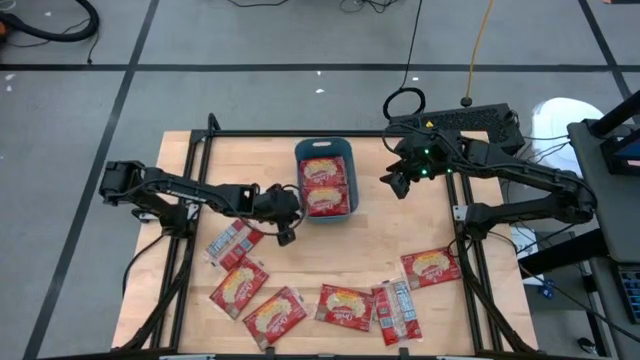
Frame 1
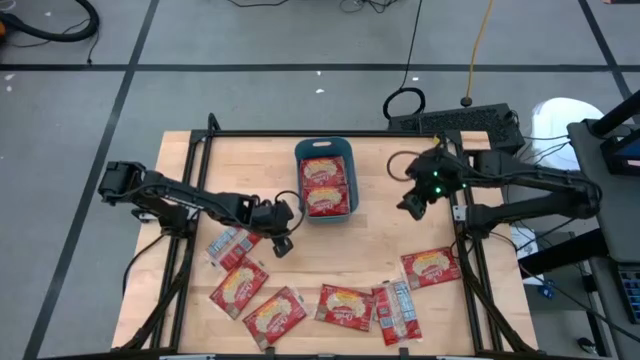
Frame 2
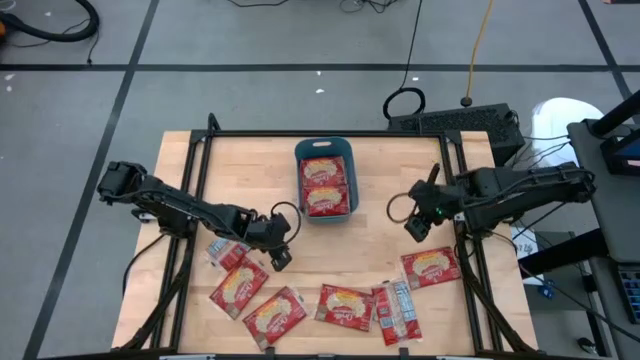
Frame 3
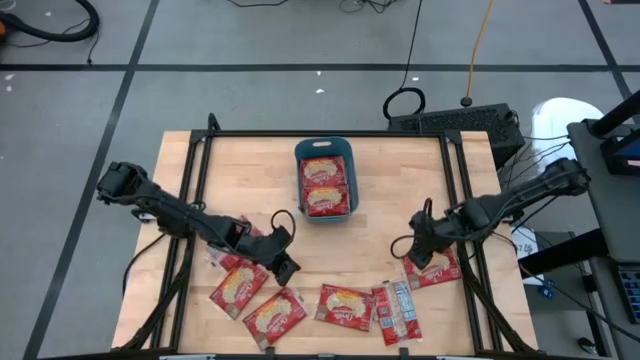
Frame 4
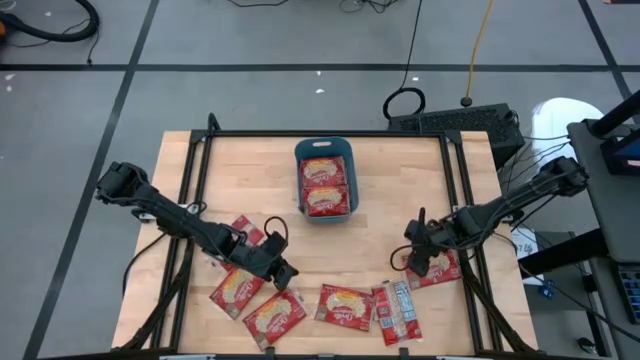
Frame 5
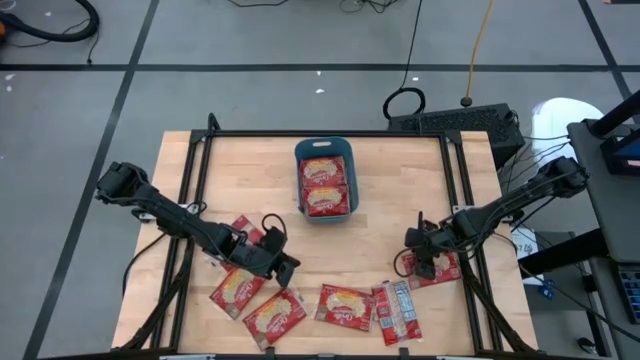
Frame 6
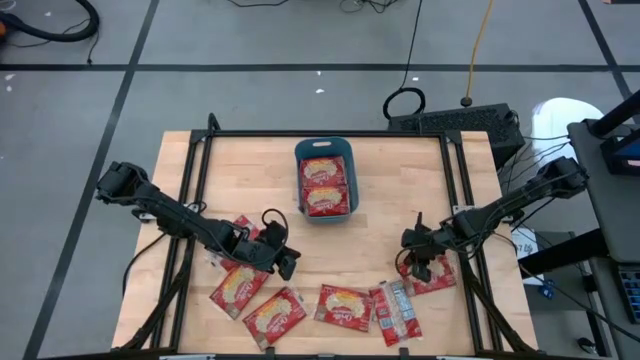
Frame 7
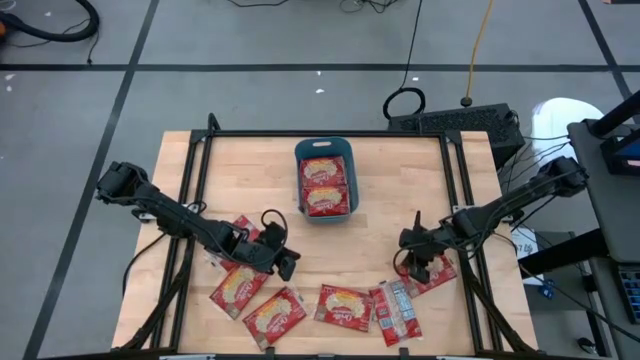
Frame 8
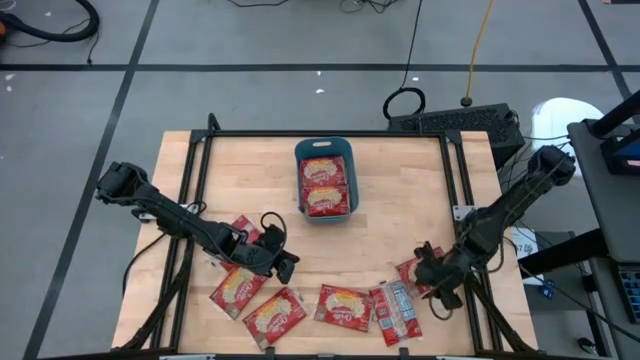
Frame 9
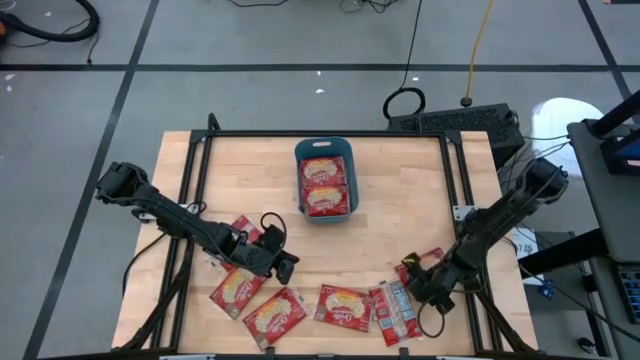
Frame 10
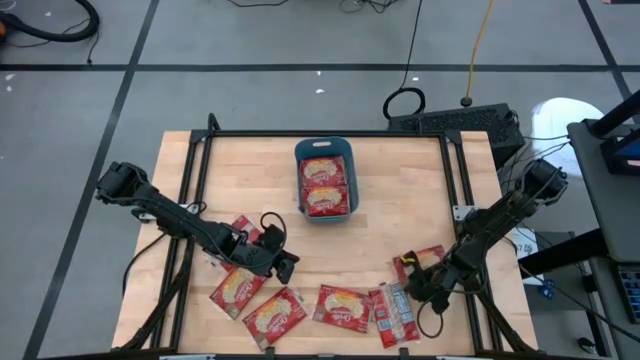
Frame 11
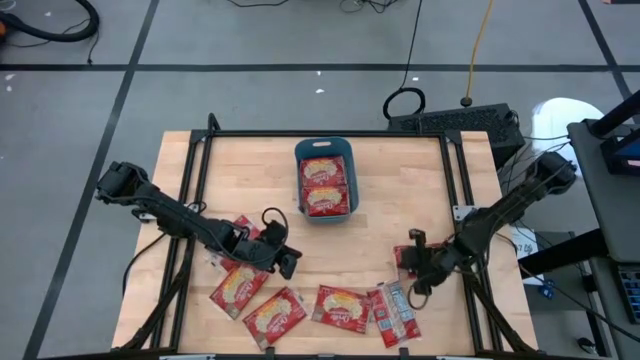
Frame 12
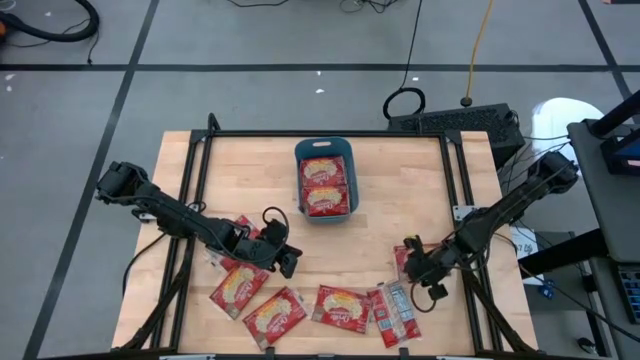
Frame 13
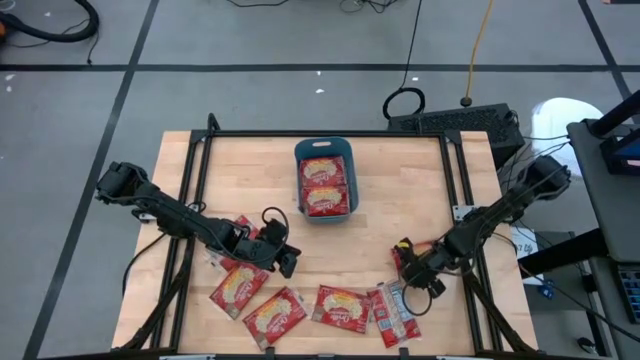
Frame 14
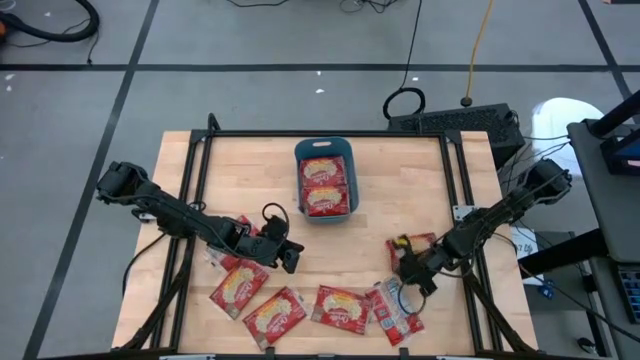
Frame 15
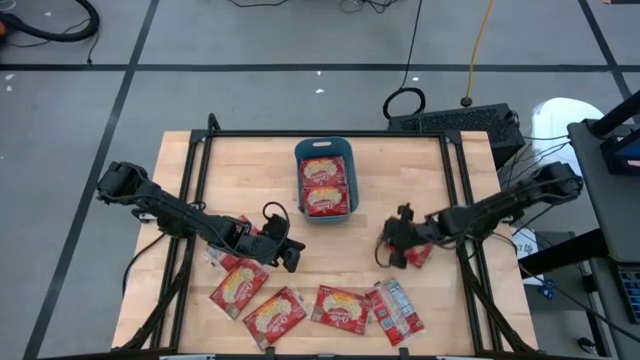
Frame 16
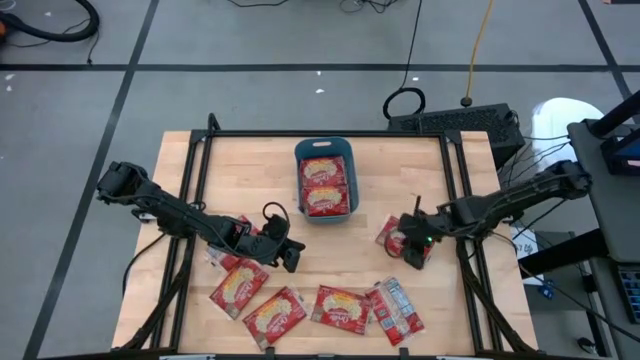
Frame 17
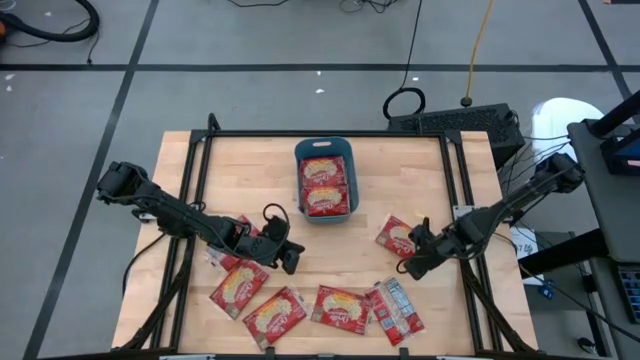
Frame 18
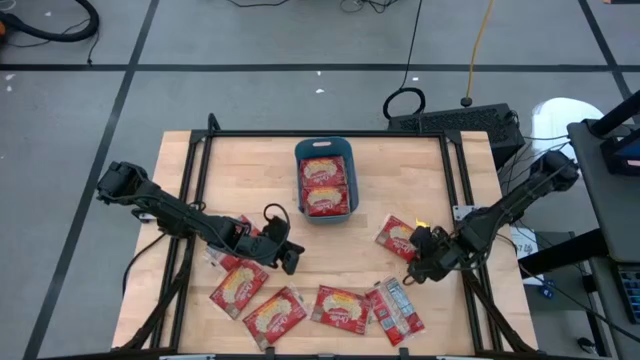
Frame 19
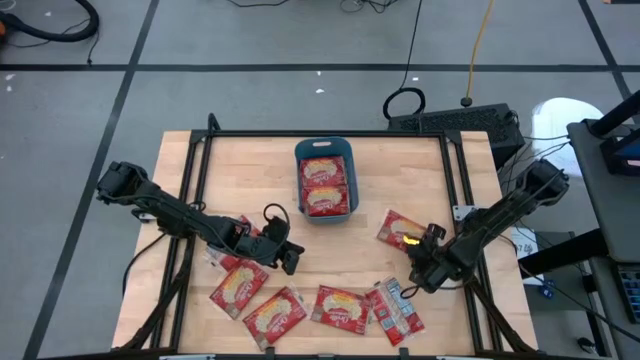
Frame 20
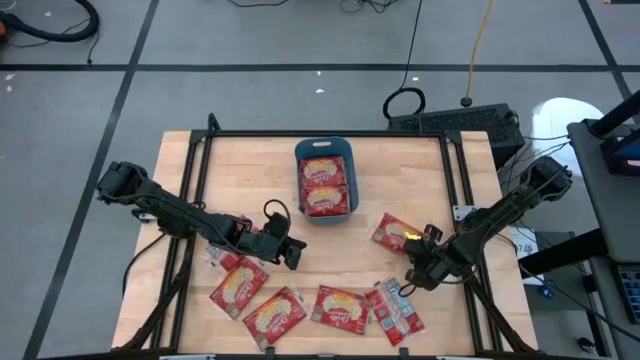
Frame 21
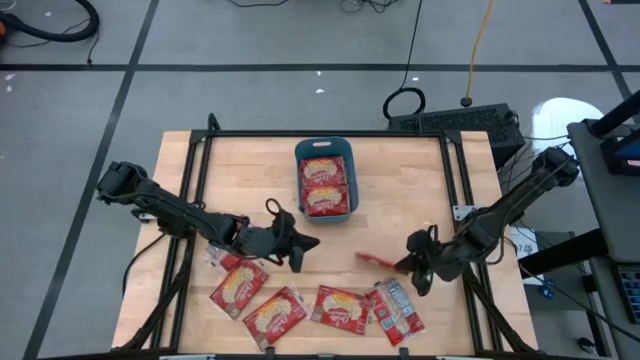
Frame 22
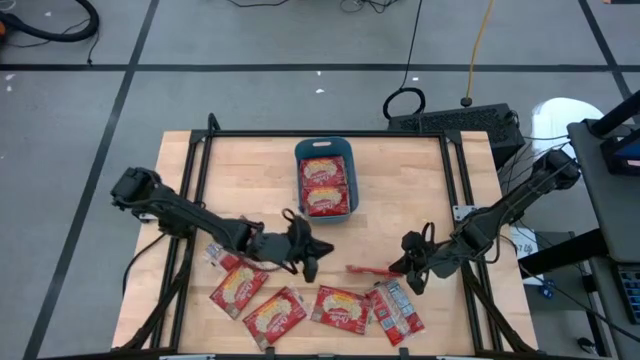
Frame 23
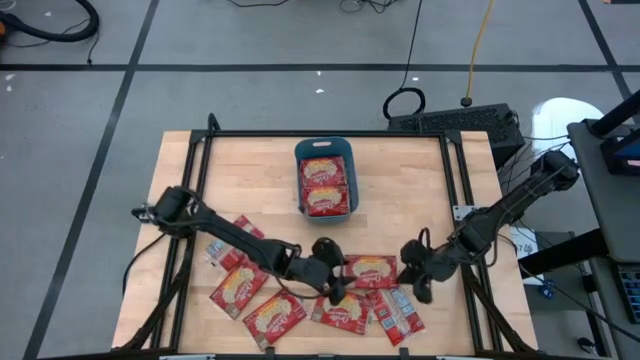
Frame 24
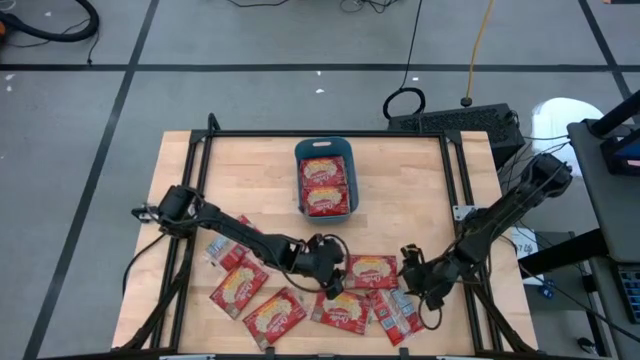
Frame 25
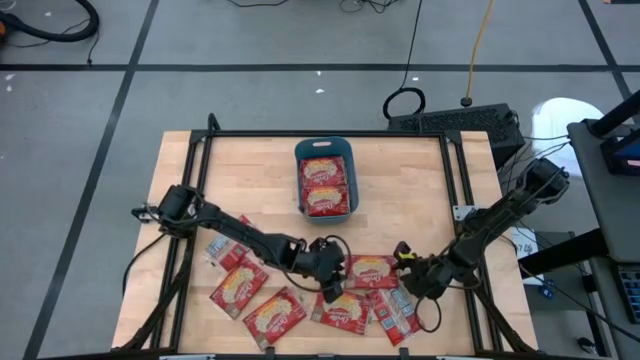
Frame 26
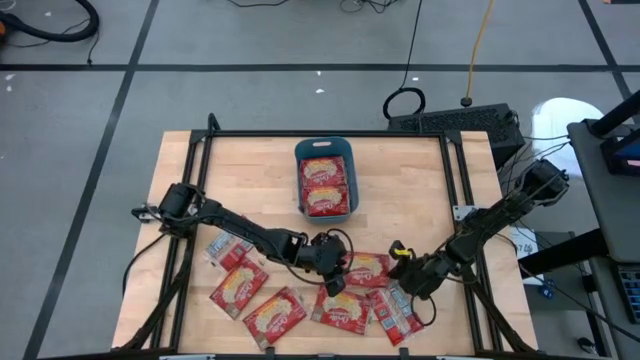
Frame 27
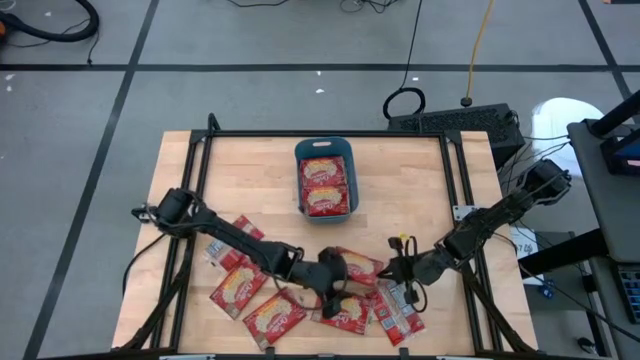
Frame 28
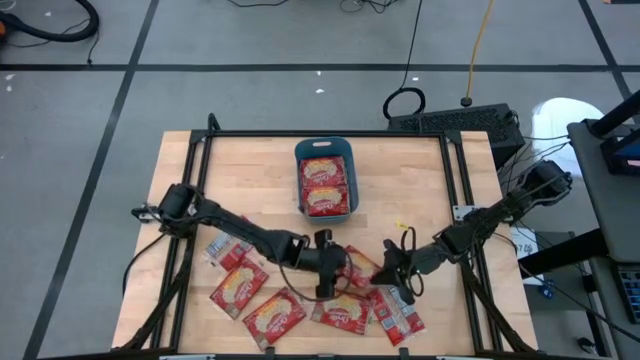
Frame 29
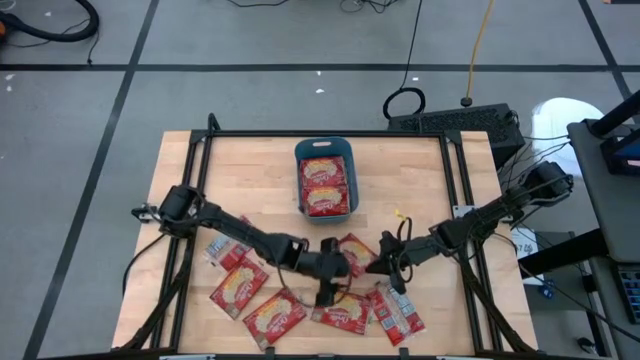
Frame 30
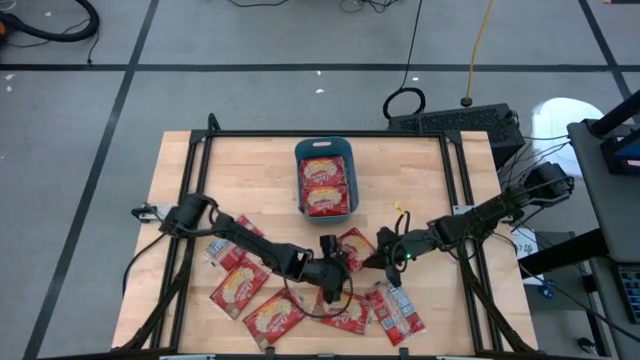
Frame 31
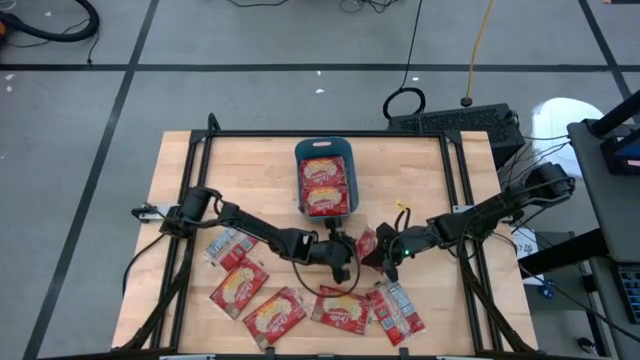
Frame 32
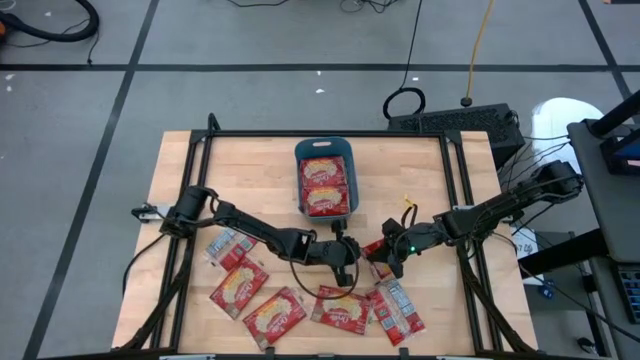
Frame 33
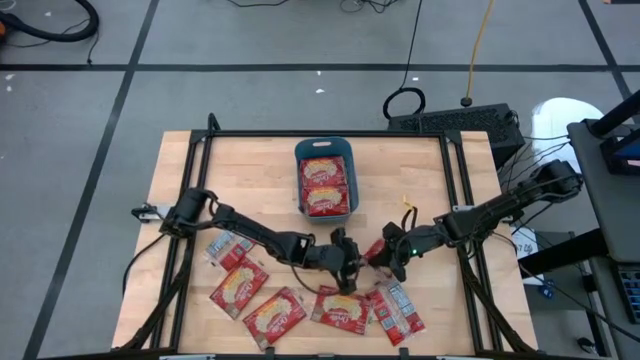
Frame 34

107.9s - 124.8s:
Task: Sort popcorn bags into baskets
Put the red popcorn bag into the blue bin

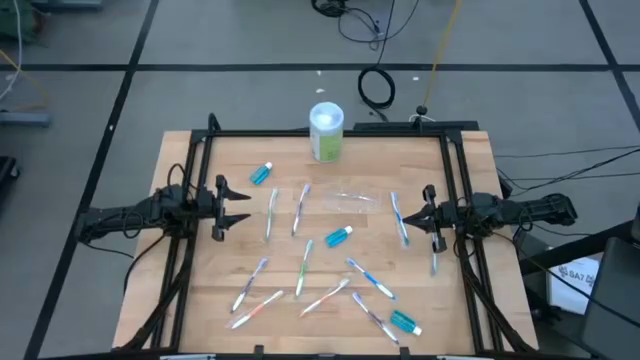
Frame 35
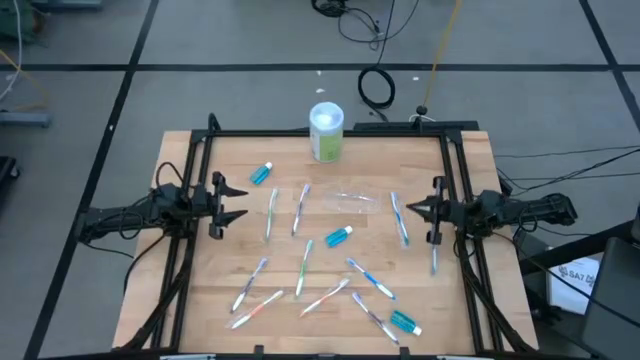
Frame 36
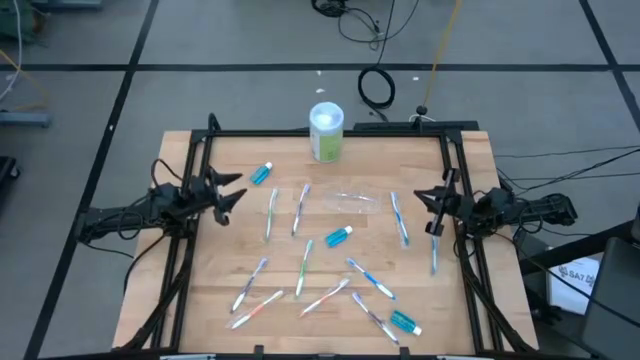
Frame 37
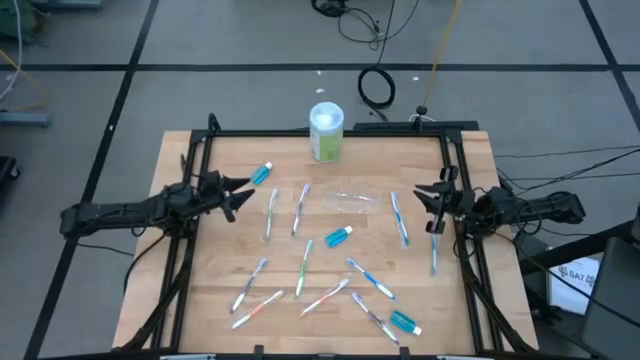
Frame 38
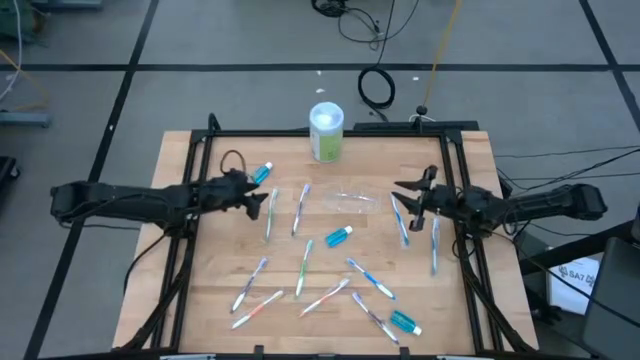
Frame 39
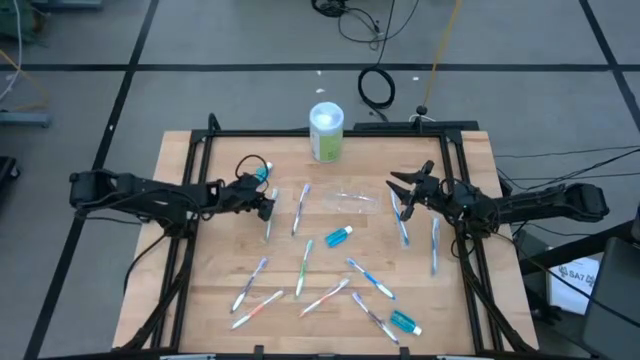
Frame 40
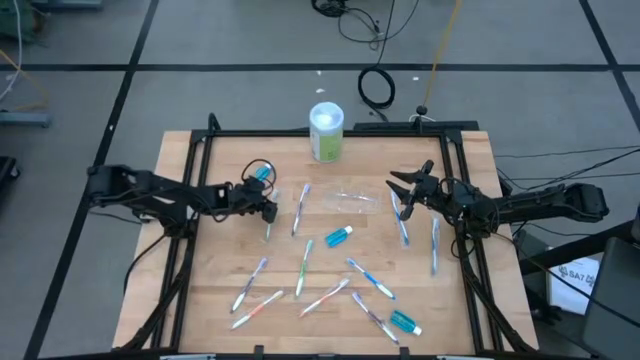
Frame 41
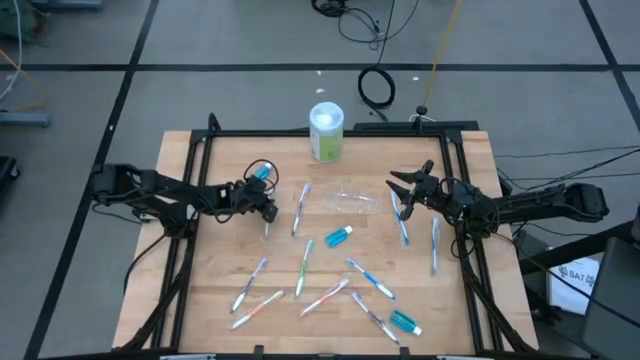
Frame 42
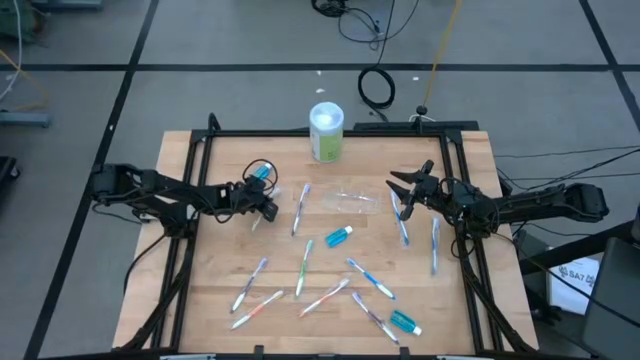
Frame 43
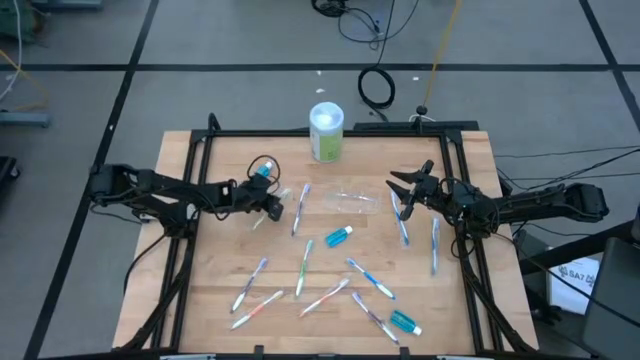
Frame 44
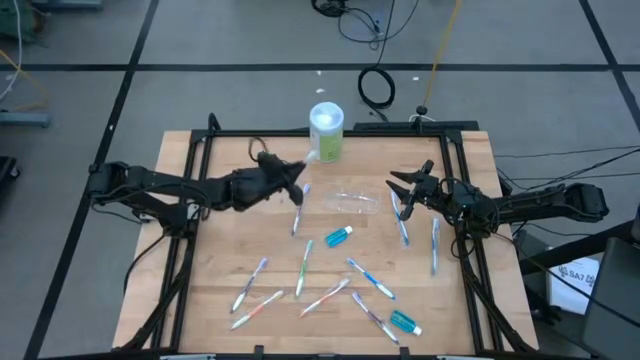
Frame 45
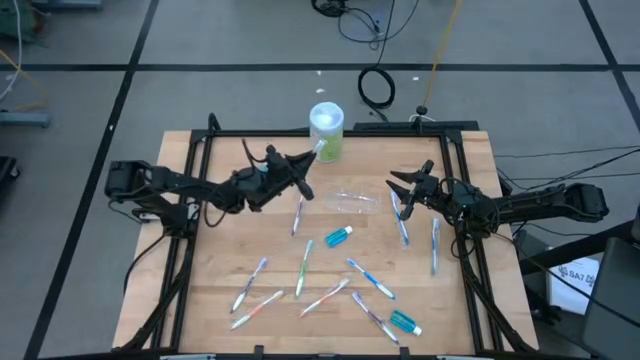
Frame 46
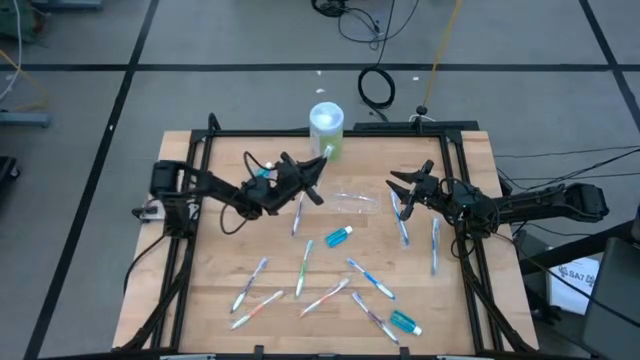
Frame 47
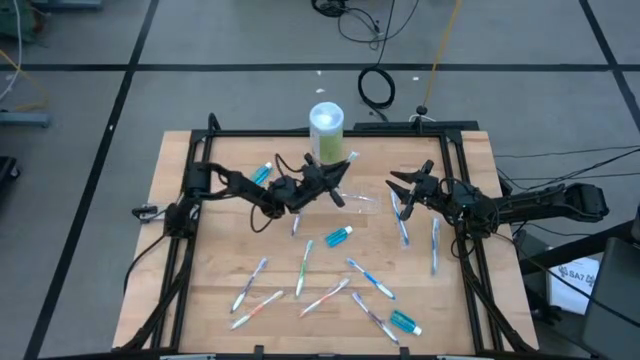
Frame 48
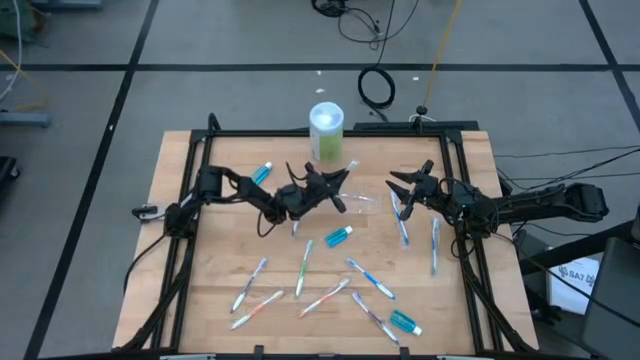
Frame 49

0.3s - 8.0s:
Task: Pick & Place toothbrushing station
Put the top left green toothbrush into the transparent organizer
